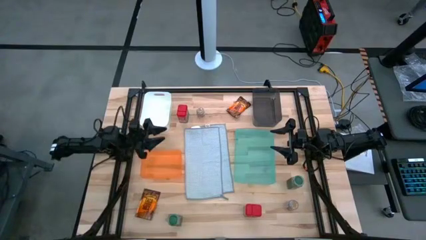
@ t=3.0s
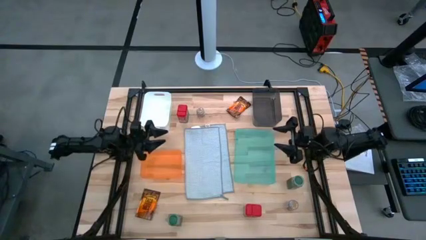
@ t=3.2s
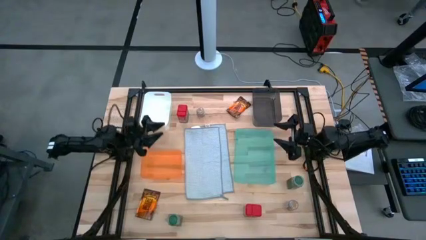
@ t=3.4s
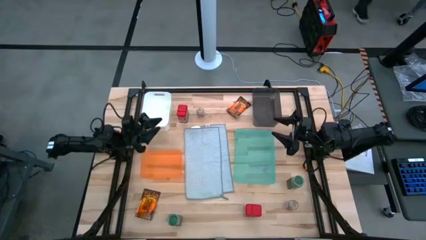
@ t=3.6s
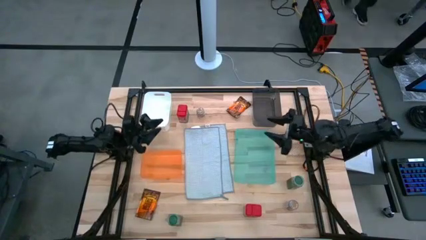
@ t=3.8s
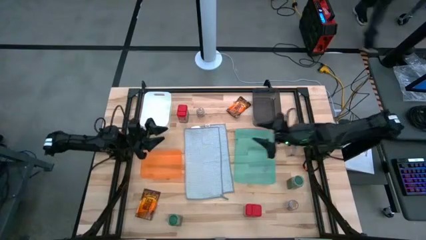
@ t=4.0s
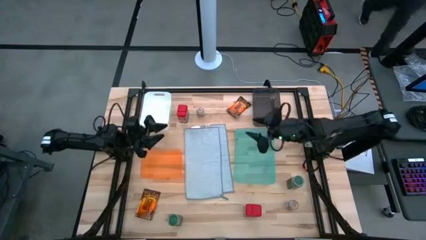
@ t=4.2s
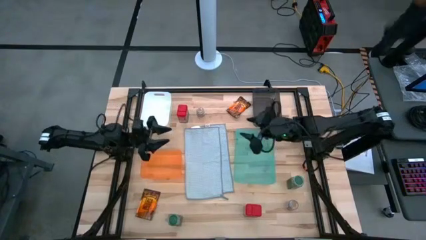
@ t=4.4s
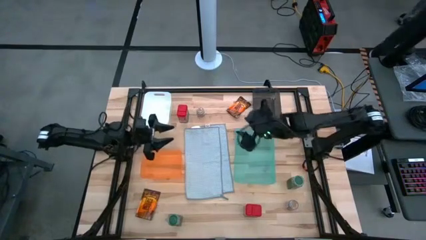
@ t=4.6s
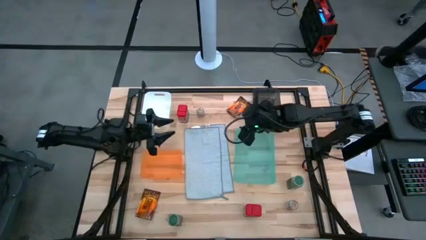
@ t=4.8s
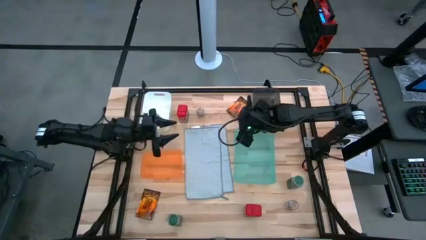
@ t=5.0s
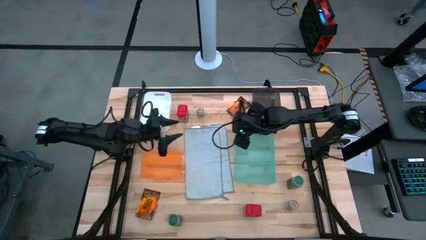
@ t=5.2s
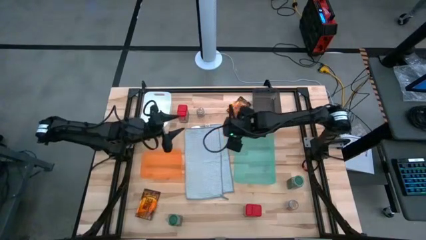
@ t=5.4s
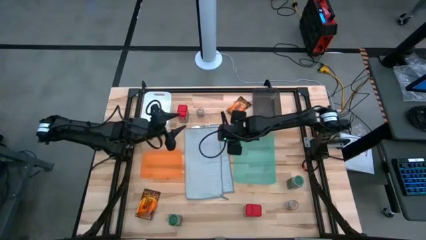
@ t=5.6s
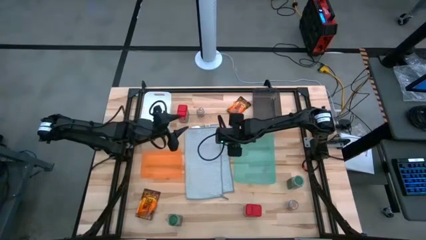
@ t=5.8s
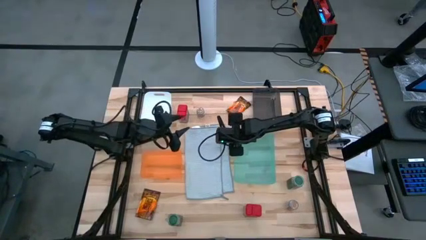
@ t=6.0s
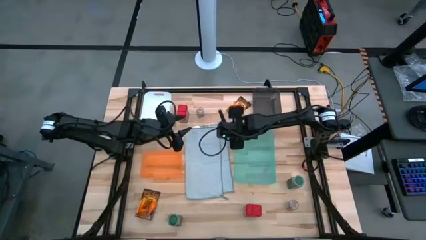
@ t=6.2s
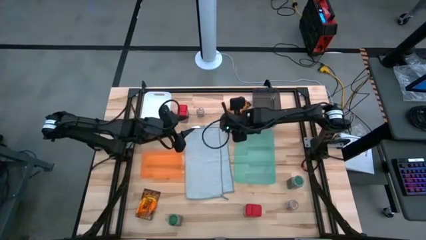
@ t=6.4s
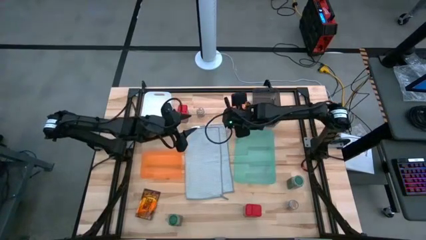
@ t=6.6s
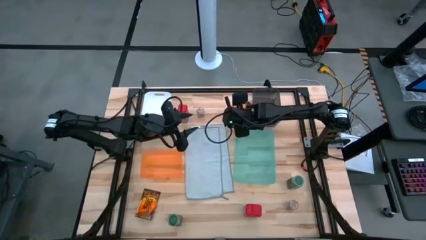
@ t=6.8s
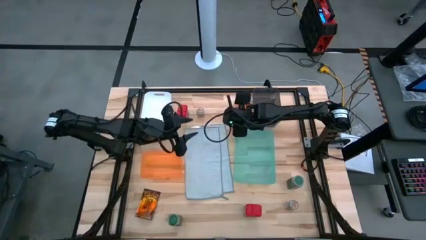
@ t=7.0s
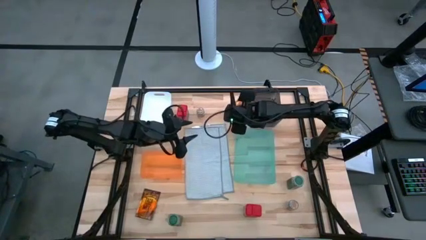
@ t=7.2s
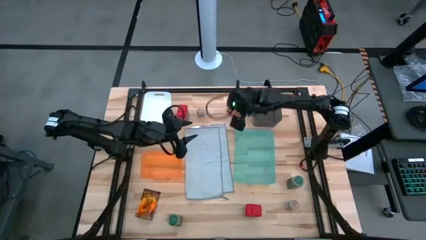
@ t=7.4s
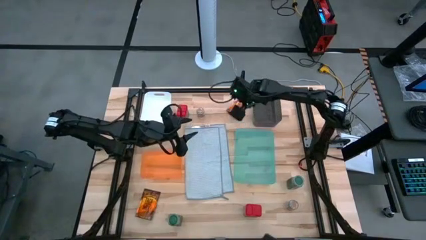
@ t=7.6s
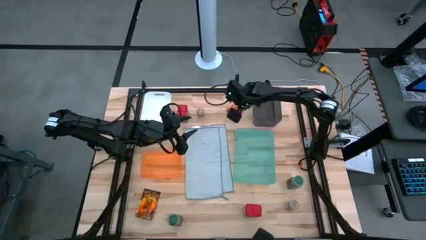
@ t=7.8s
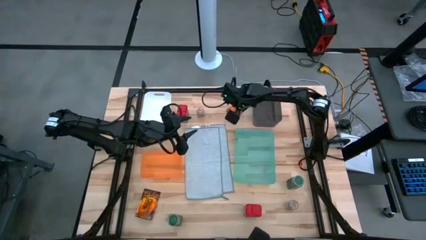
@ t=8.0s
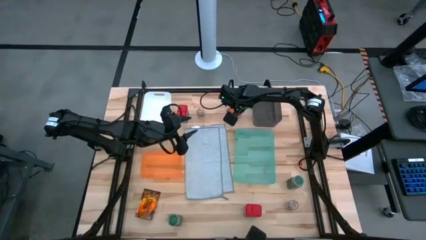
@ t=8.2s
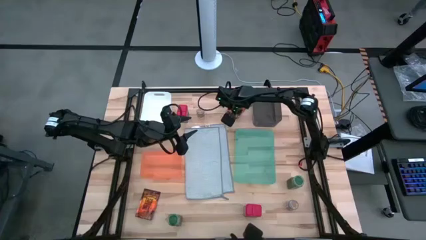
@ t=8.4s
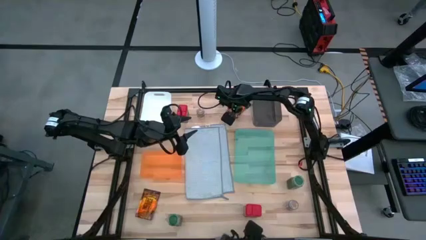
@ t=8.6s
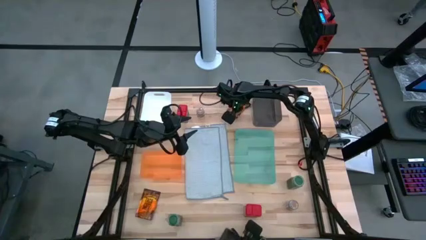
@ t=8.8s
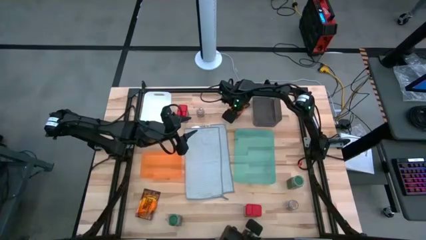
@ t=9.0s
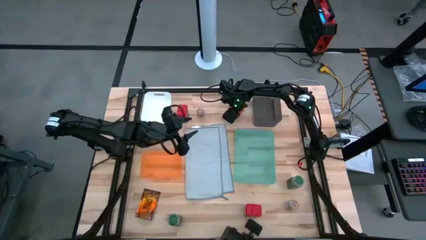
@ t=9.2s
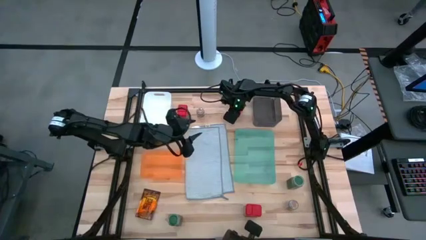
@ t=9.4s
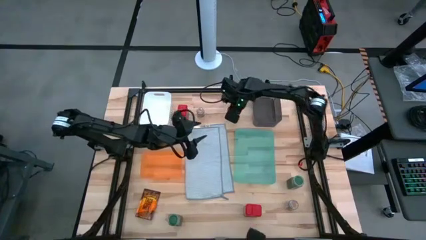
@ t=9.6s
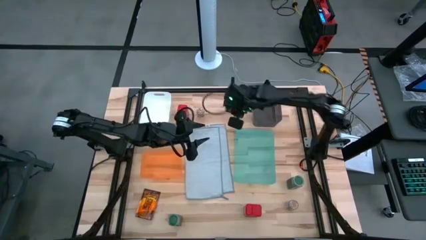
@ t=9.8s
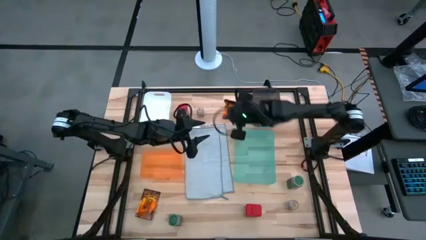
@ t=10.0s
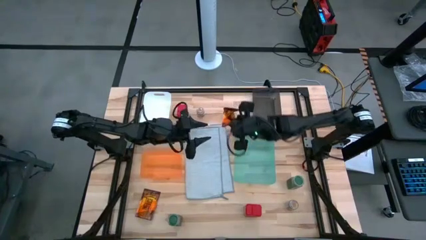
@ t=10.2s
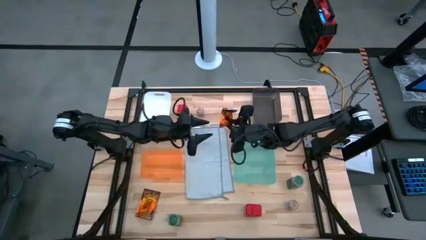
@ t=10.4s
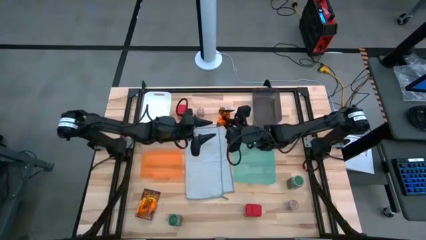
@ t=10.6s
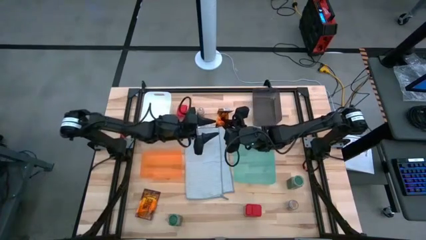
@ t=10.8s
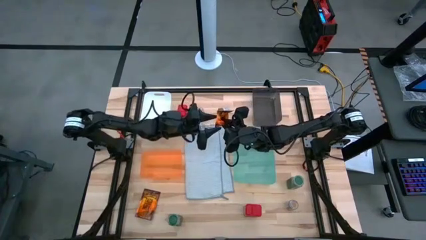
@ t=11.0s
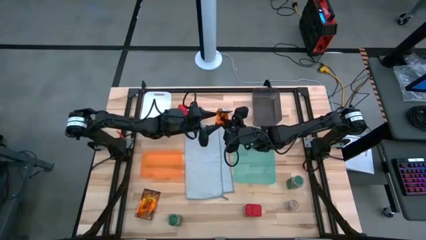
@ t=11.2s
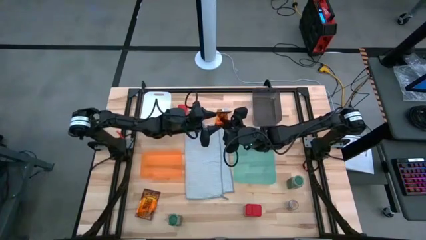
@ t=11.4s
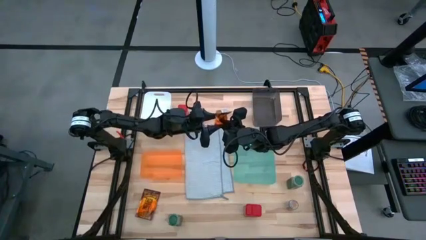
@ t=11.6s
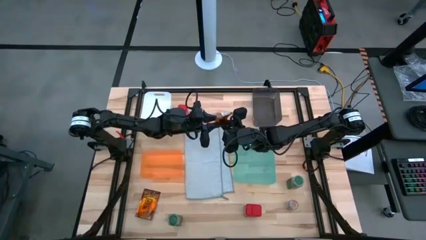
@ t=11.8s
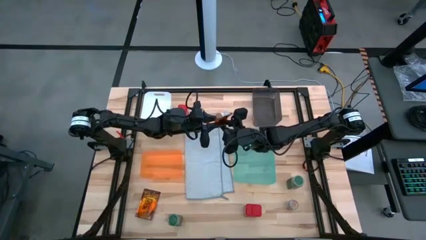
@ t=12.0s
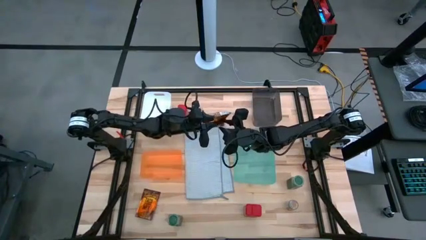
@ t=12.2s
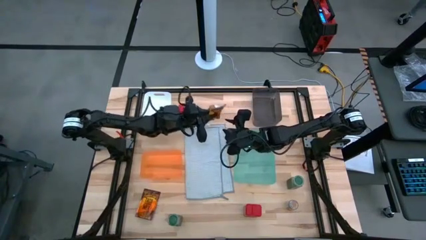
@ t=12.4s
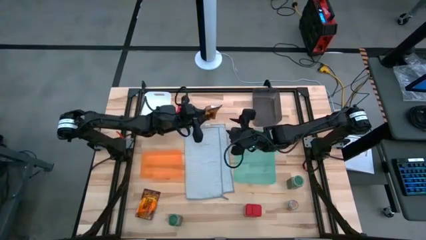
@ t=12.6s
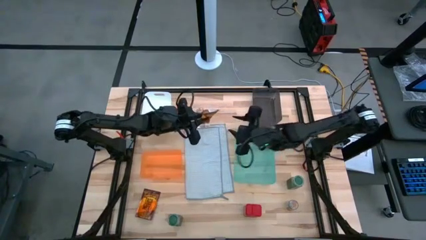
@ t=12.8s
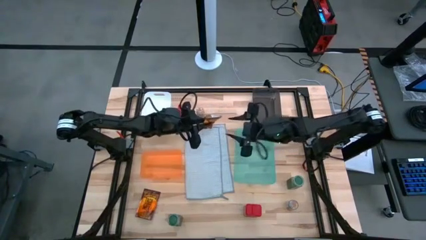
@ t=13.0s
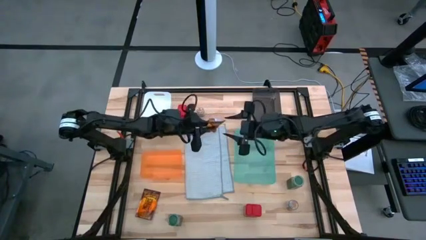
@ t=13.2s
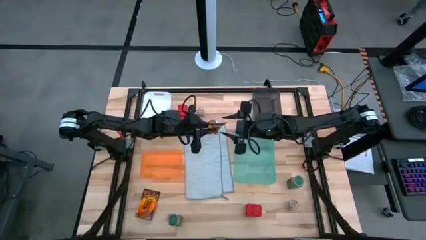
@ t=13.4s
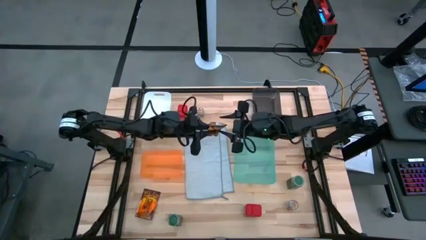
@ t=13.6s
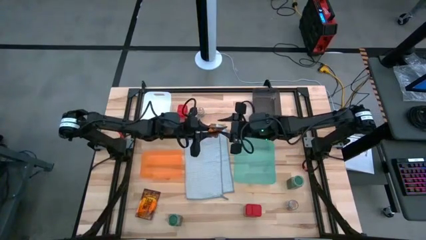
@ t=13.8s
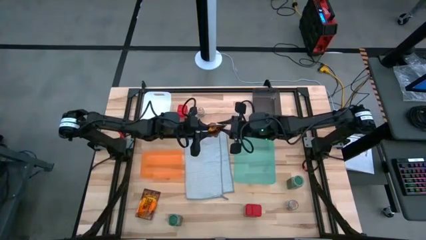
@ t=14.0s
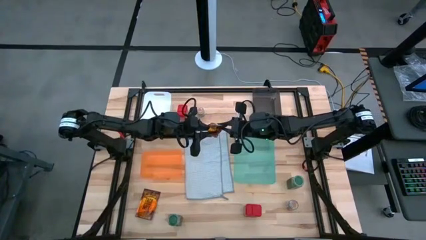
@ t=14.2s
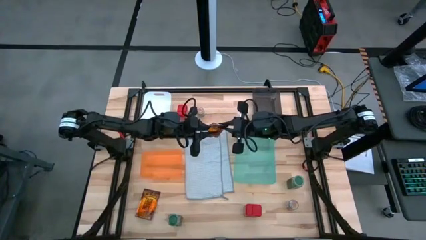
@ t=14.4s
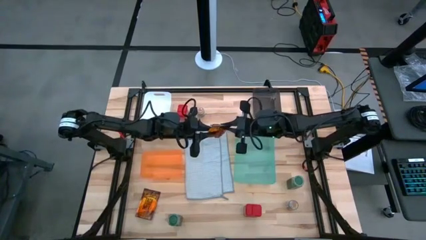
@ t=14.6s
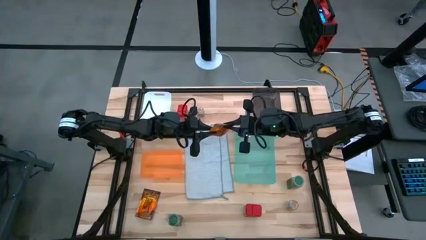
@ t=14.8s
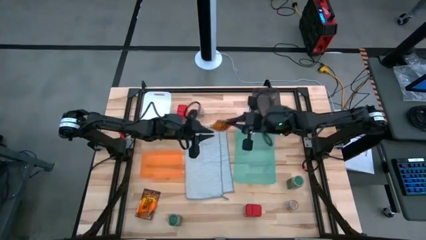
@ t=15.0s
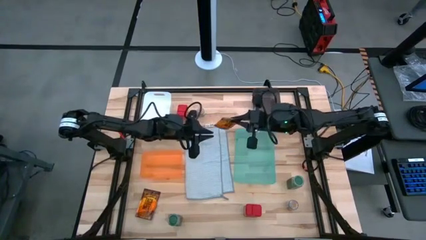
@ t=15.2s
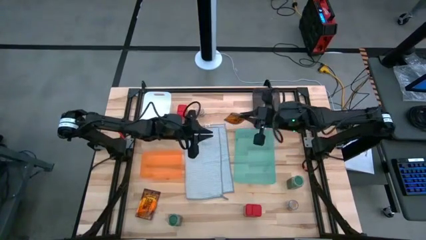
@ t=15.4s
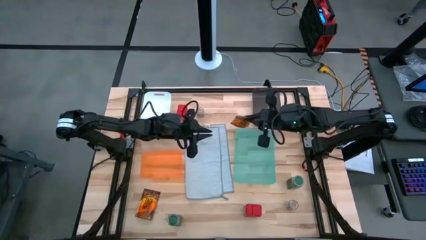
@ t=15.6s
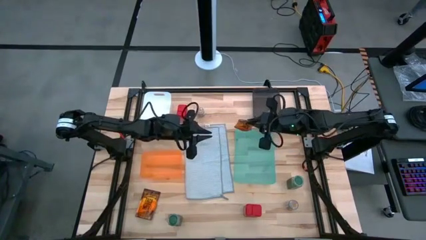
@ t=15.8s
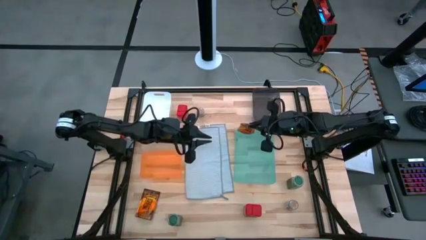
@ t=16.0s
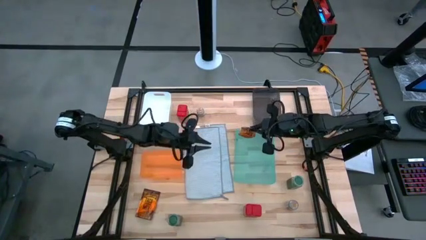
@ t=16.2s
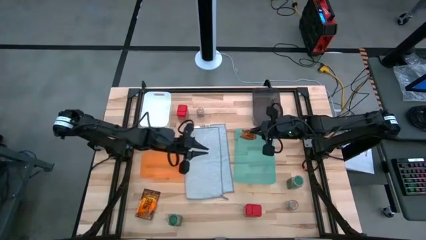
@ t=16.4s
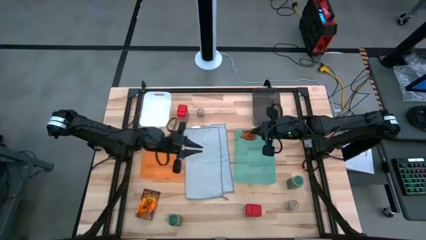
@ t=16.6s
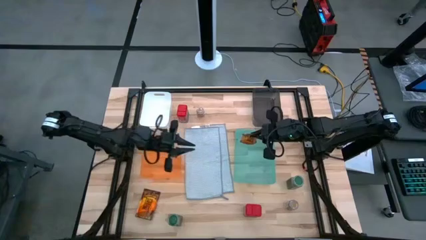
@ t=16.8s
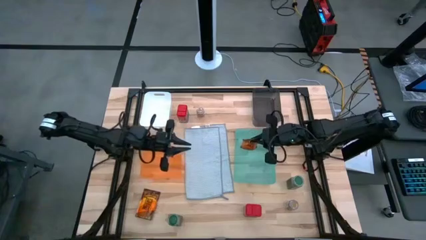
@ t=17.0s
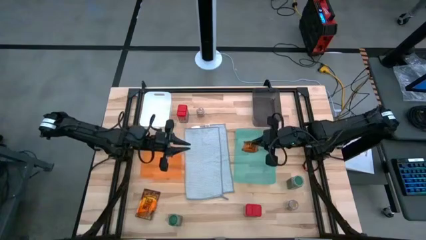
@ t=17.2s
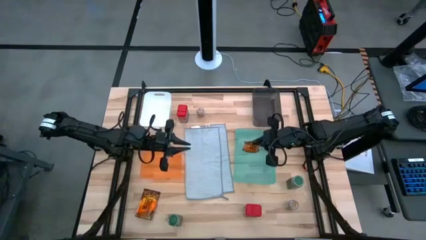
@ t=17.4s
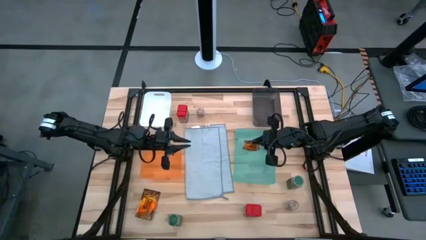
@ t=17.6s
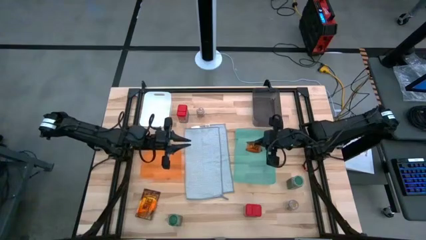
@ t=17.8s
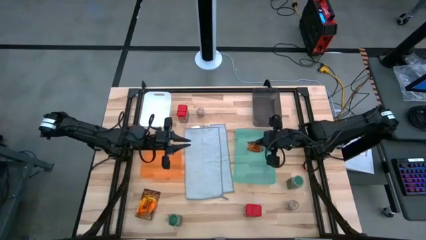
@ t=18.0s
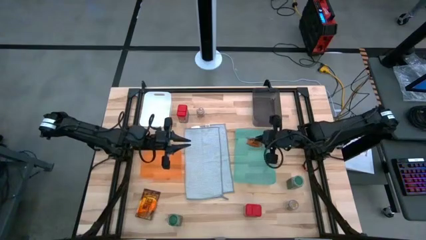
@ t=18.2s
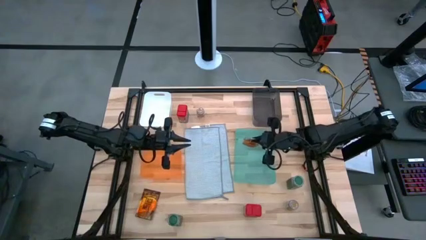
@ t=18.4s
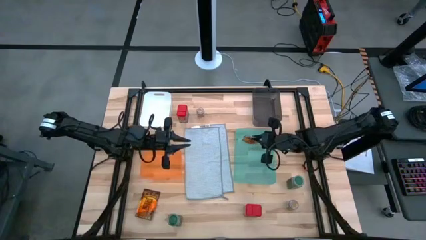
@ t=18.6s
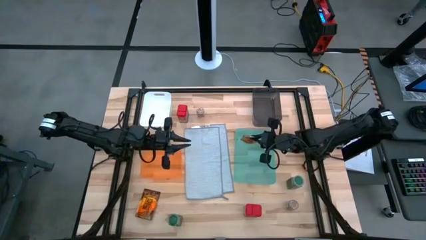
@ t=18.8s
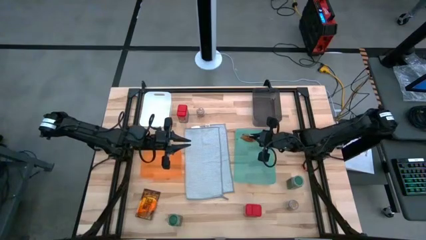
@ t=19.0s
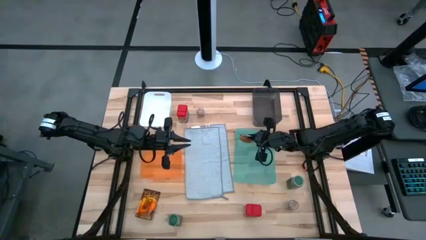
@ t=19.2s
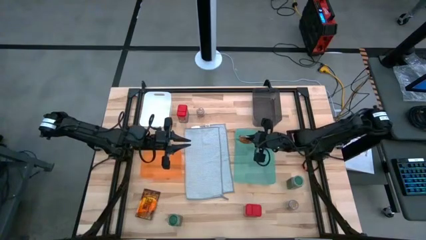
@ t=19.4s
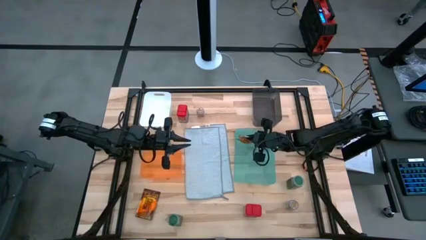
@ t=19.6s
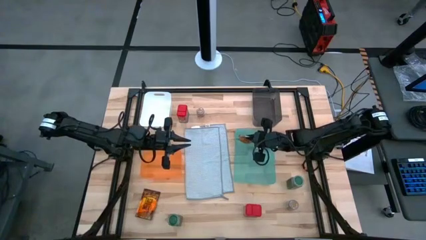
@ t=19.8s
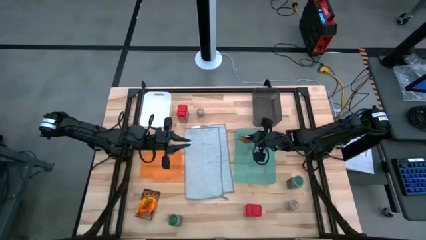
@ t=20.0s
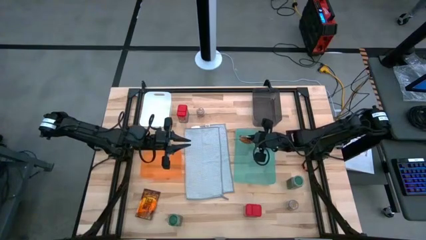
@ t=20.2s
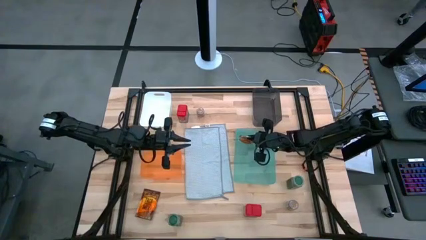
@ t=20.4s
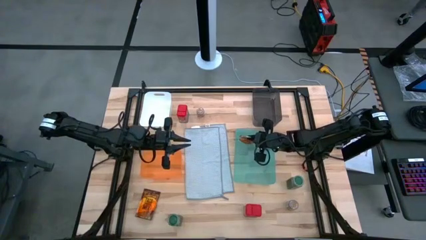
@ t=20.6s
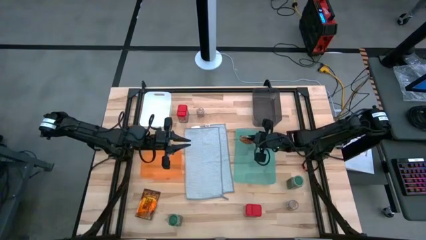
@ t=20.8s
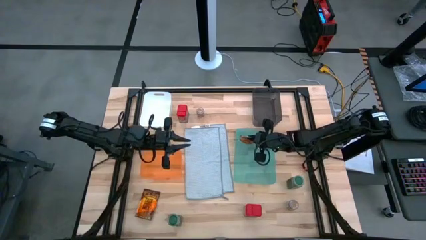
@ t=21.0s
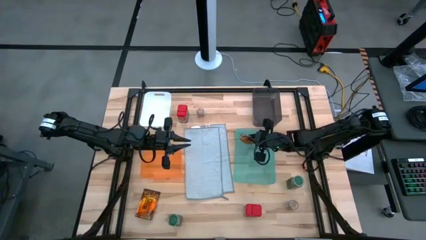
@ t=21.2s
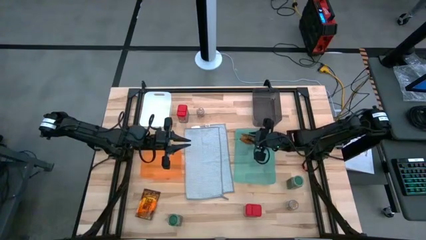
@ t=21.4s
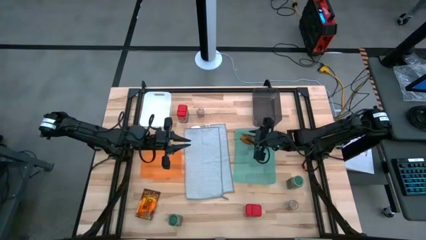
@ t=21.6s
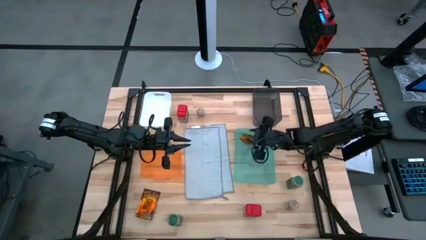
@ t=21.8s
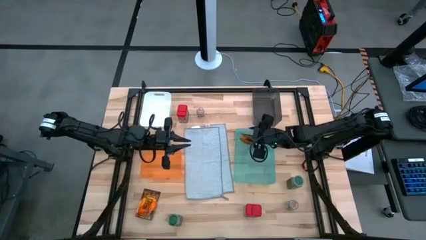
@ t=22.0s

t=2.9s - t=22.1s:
Task: Sort spices by type
Put the top orange seasoning packet into the green bin
